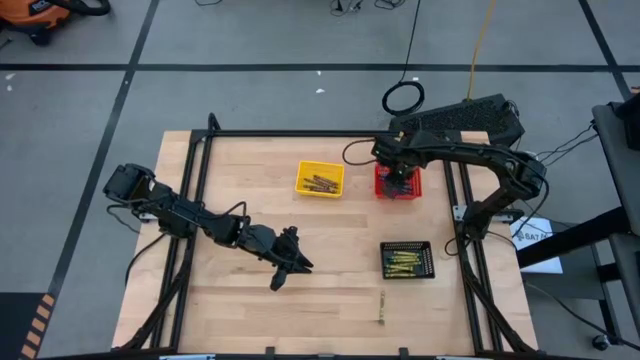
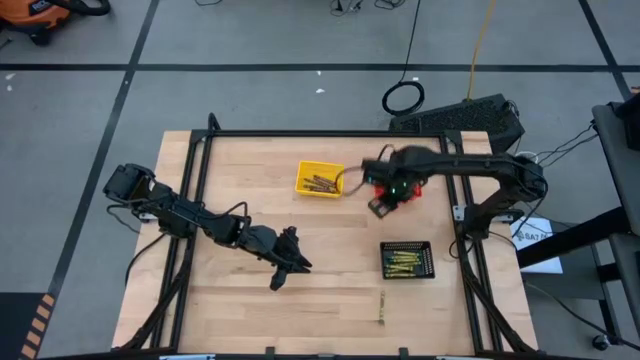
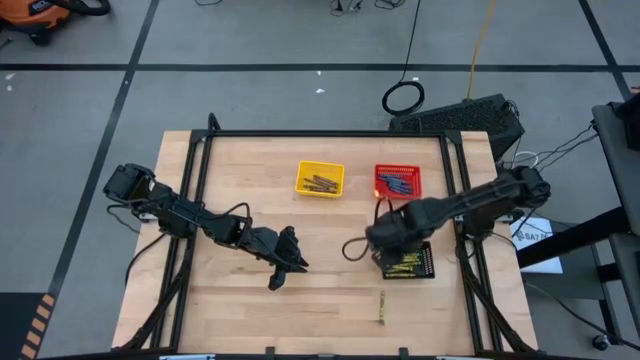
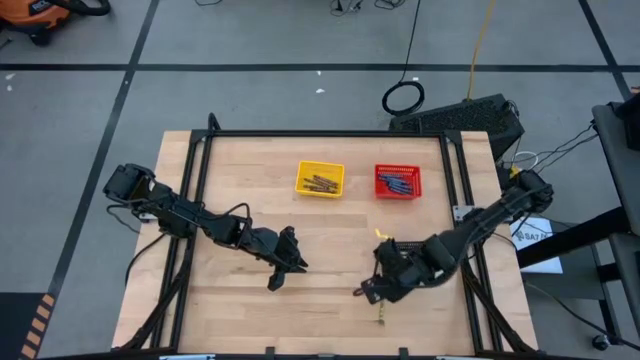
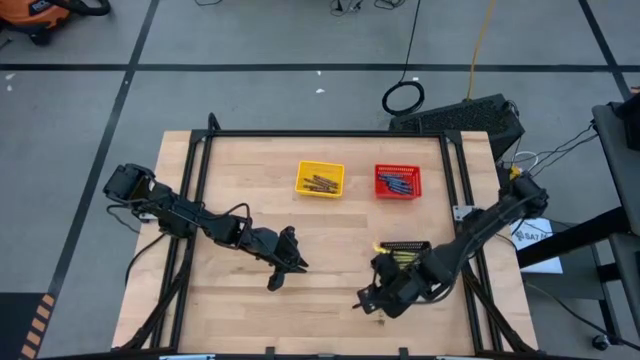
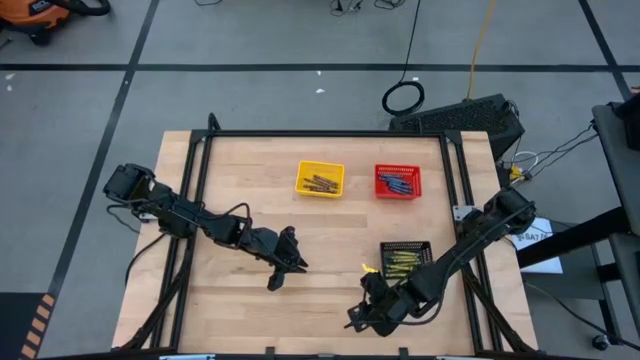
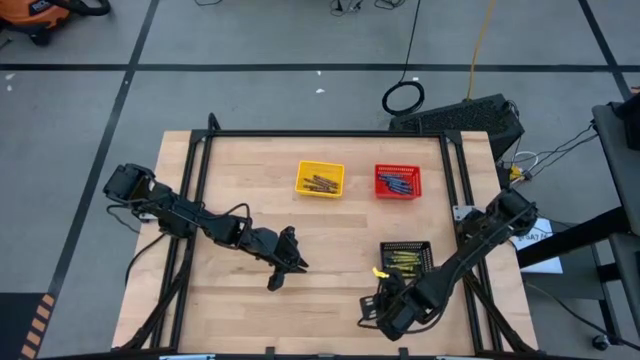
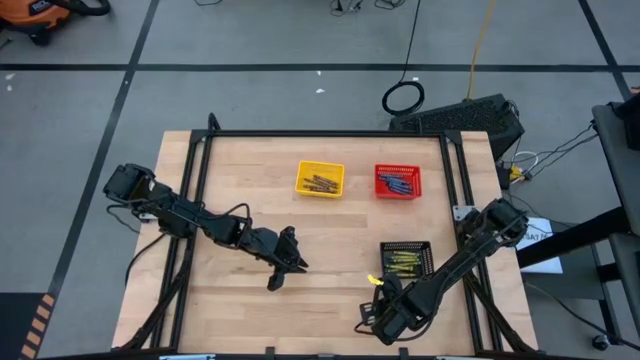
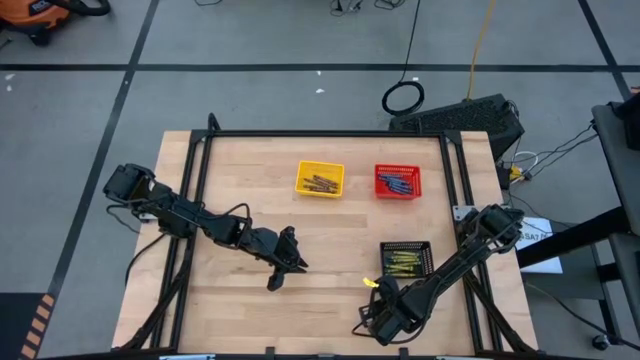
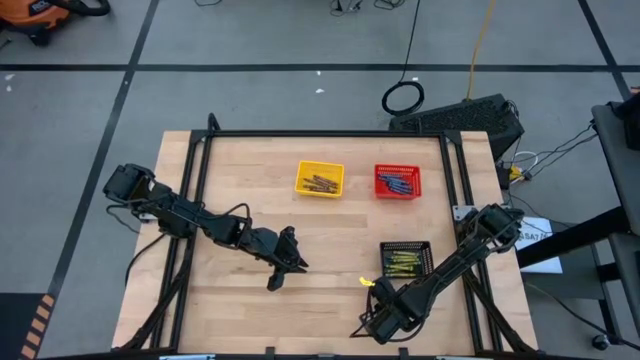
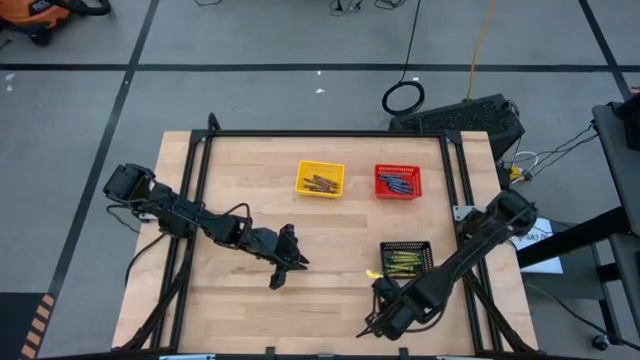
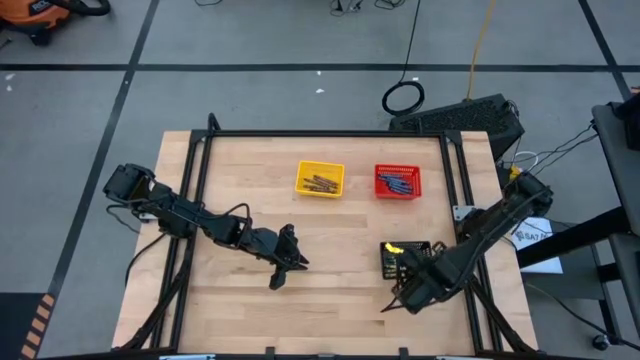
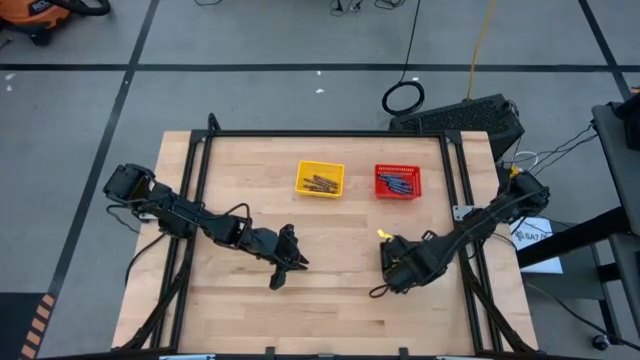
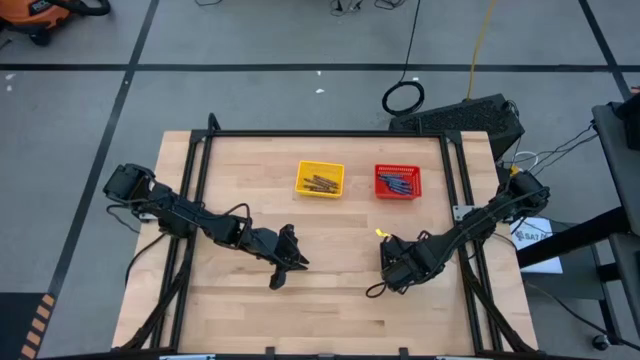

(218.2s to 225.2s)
Task: Sort crayons
Put the green crayon into the black bin

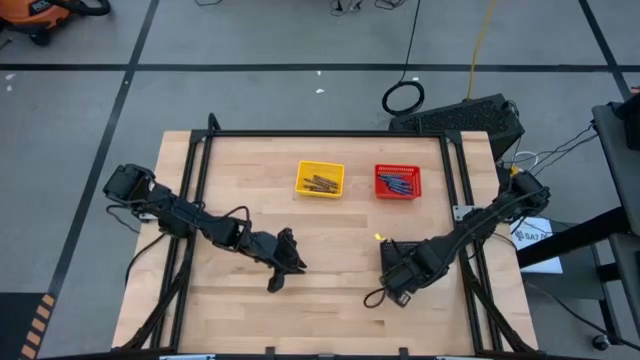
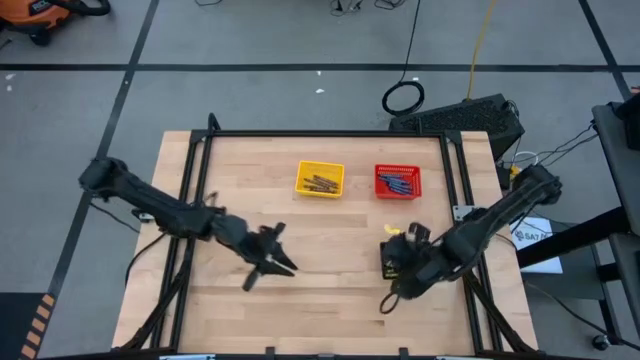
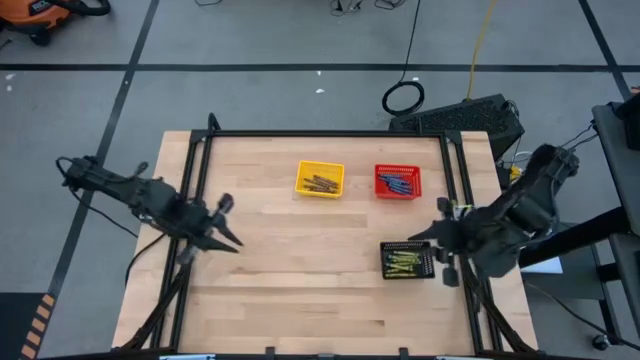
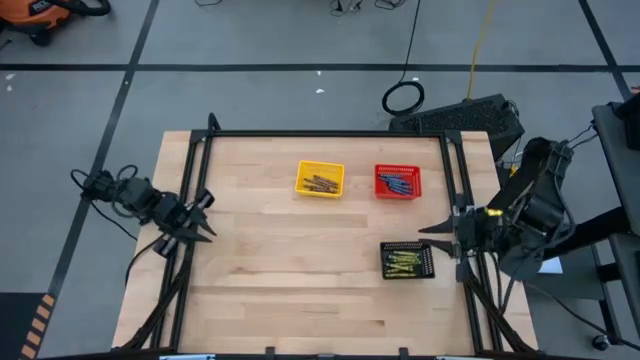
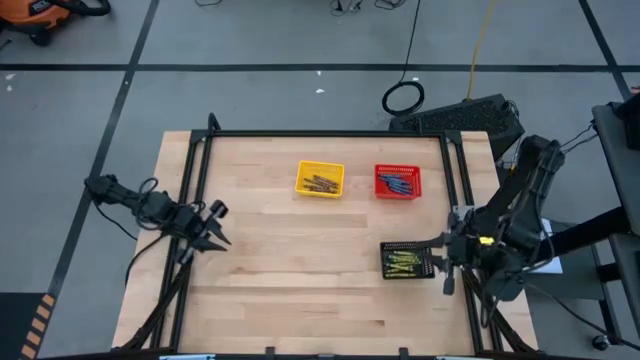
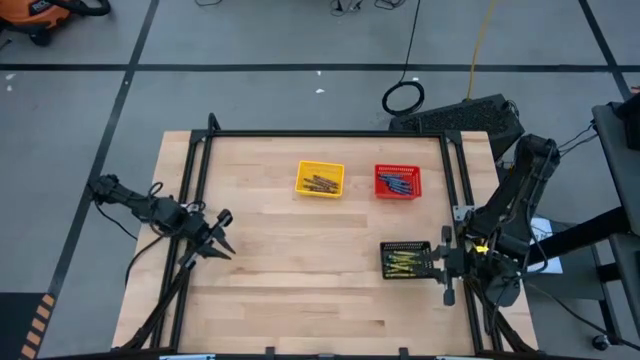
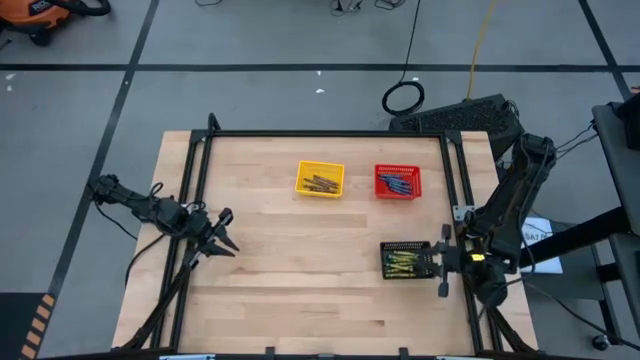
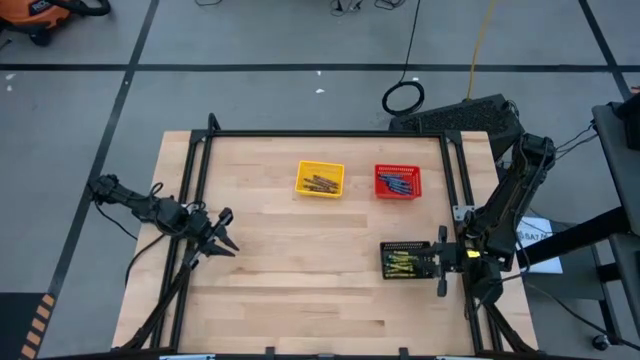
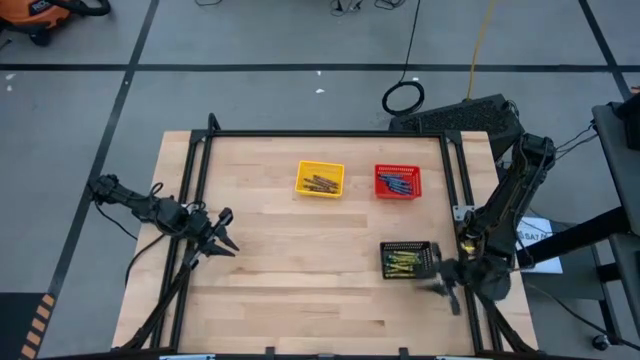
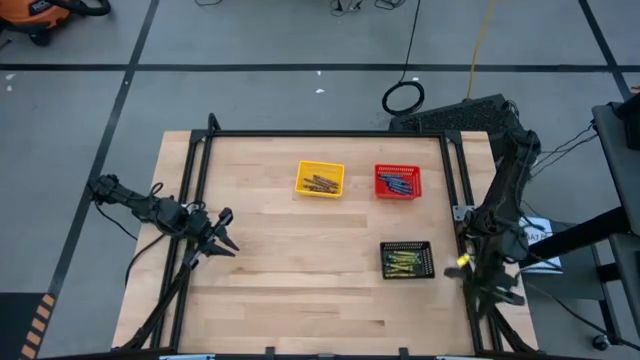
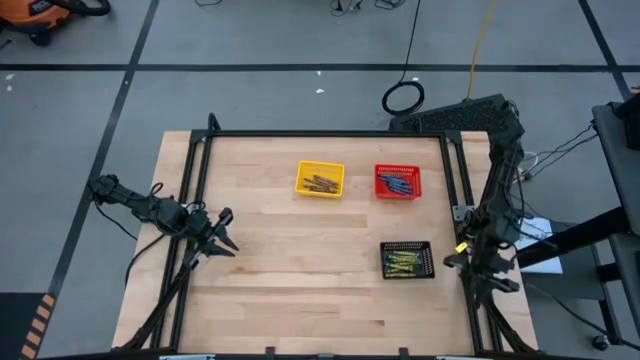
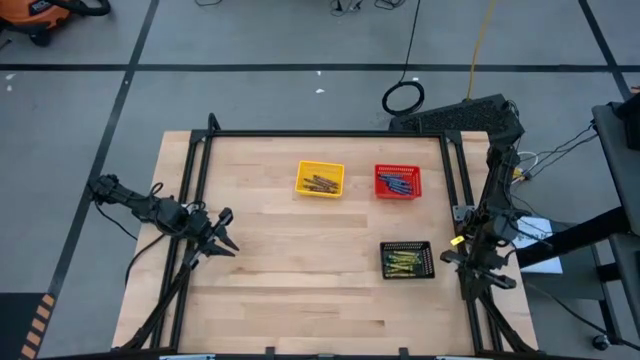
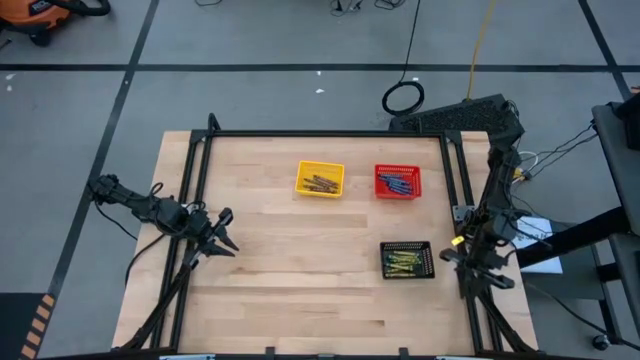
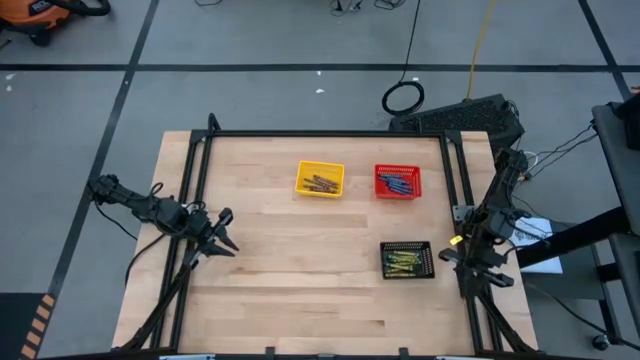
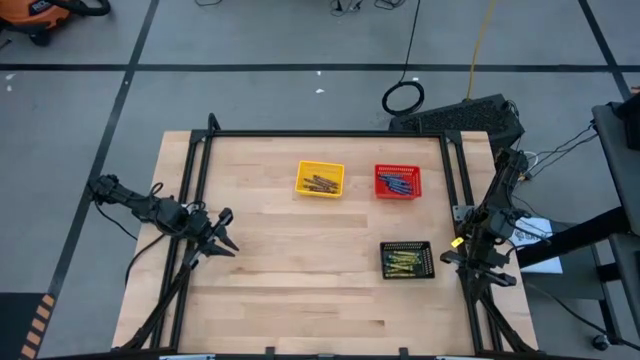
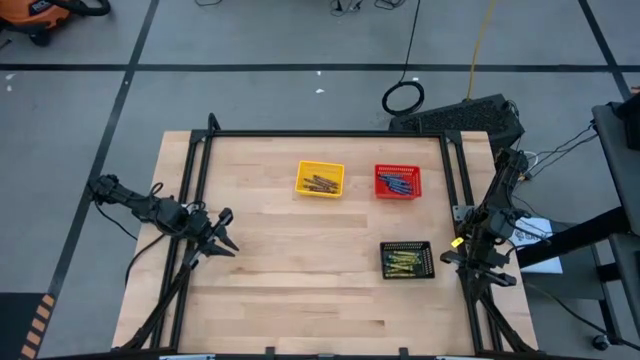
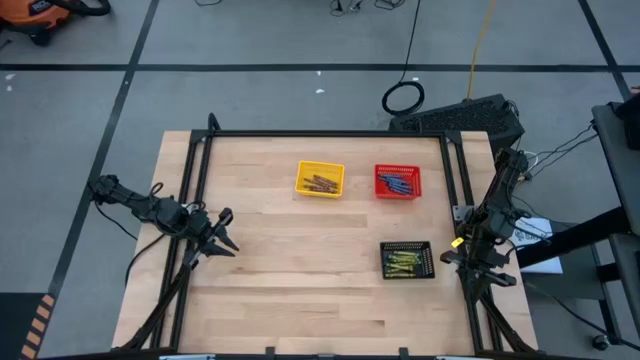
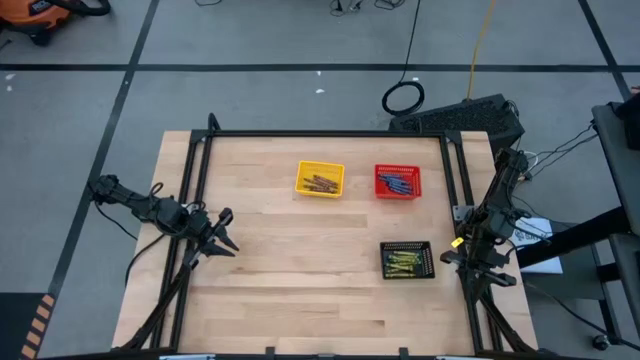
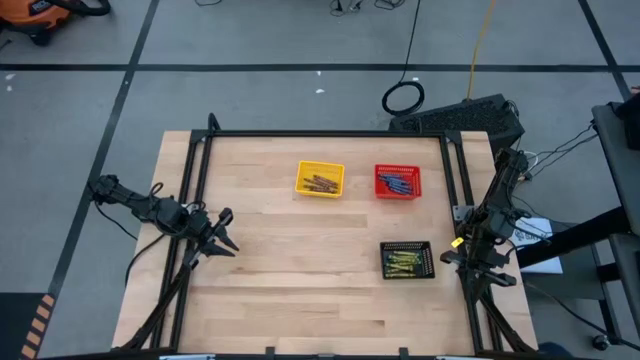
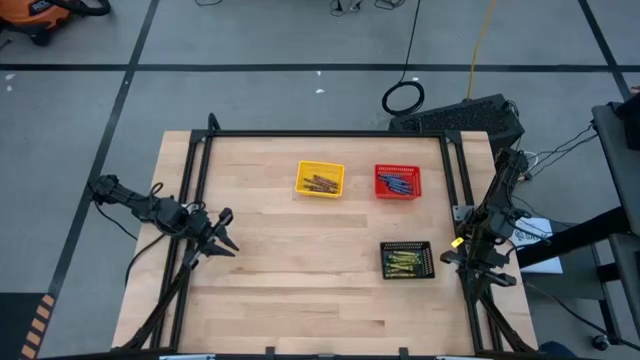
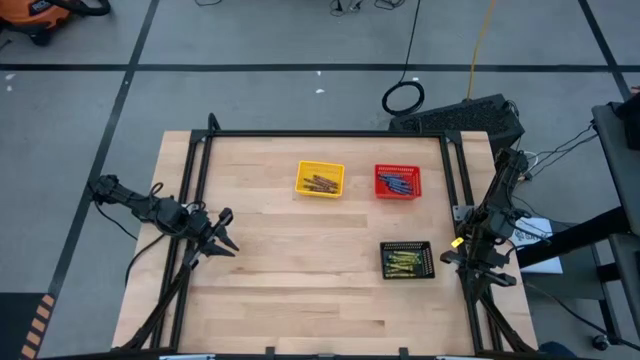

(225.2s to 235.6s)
Return to Home Position

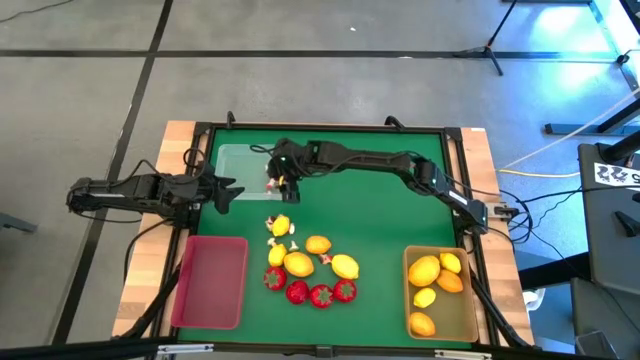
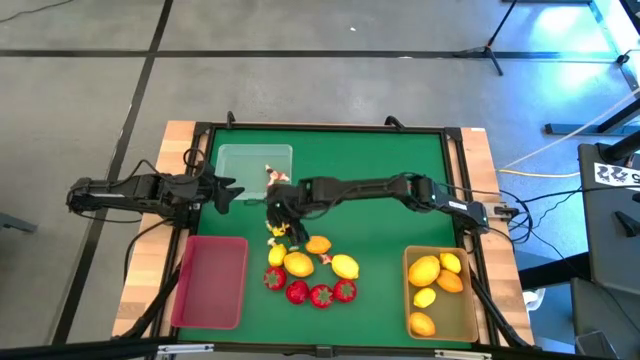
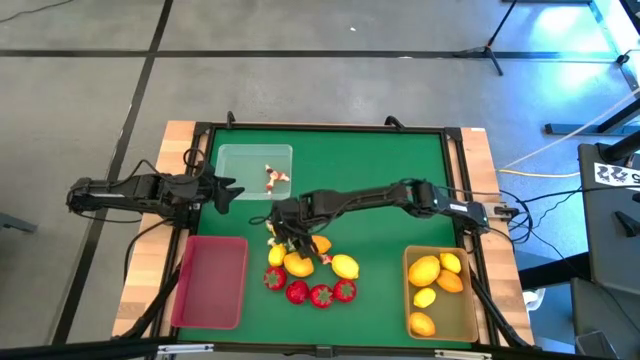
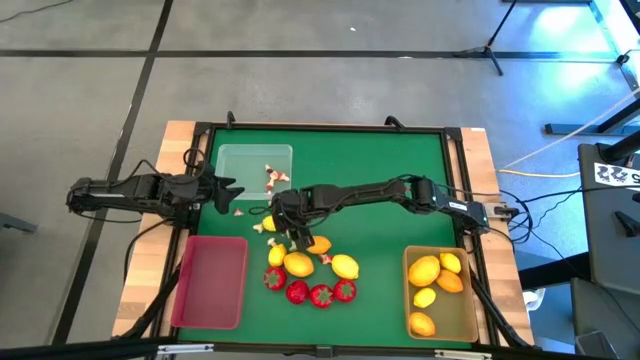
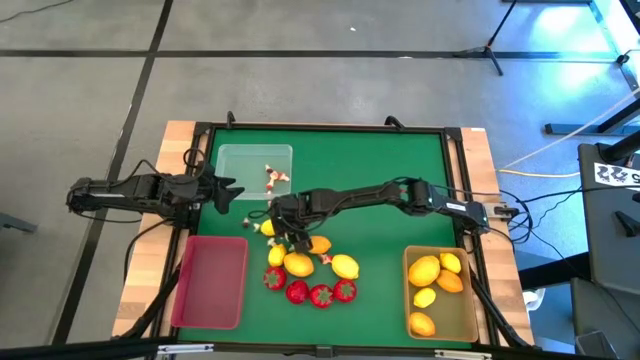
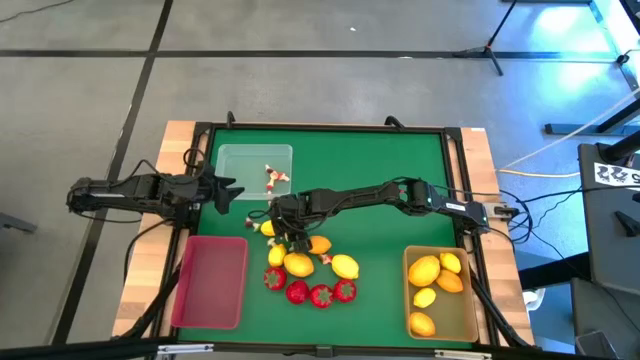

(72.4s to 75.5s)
Task: Sort produce into baskets
Put the red mushroom into the transparent bin
